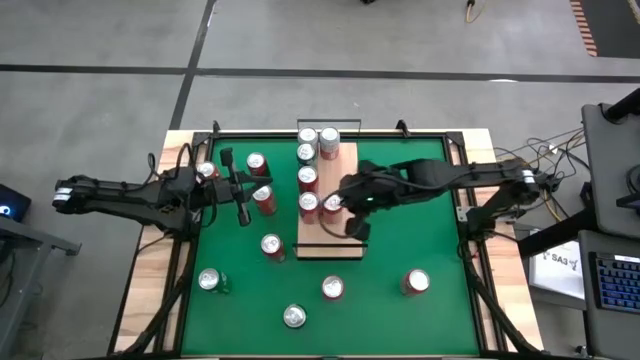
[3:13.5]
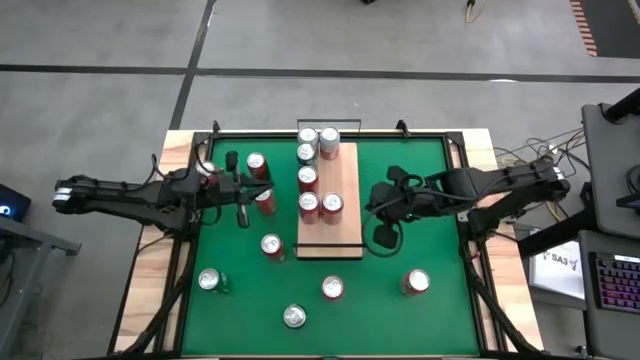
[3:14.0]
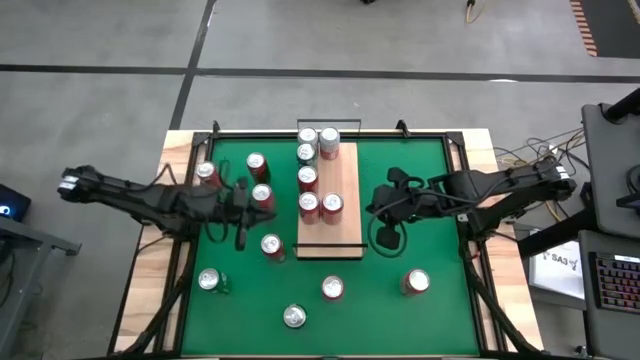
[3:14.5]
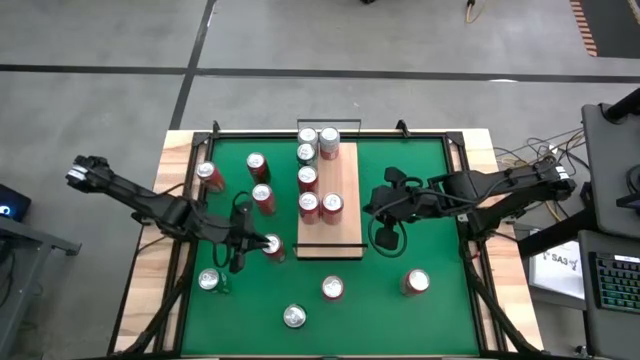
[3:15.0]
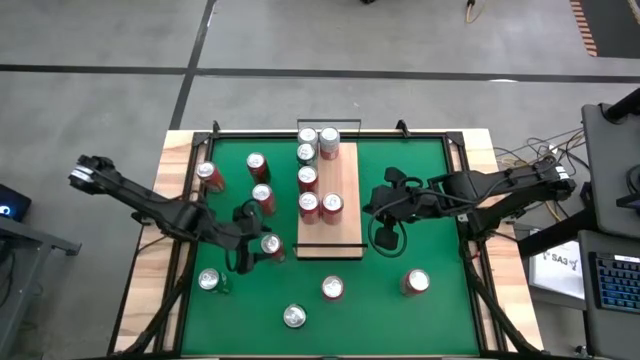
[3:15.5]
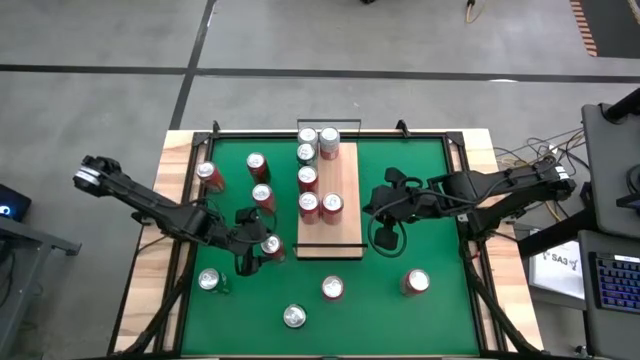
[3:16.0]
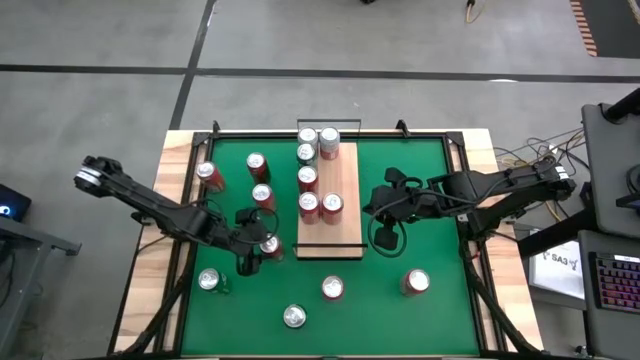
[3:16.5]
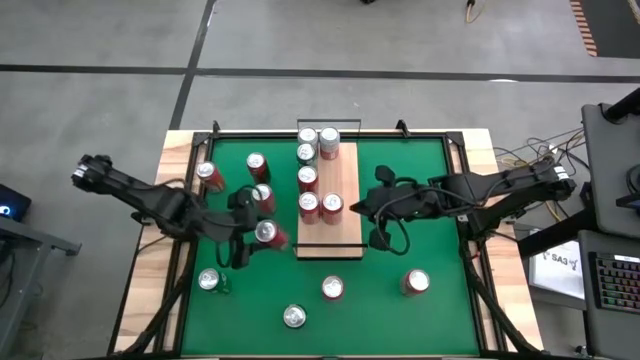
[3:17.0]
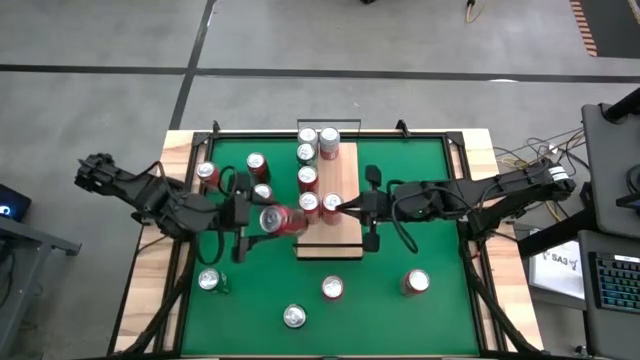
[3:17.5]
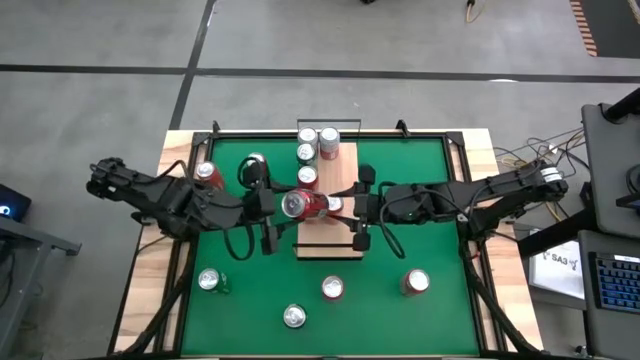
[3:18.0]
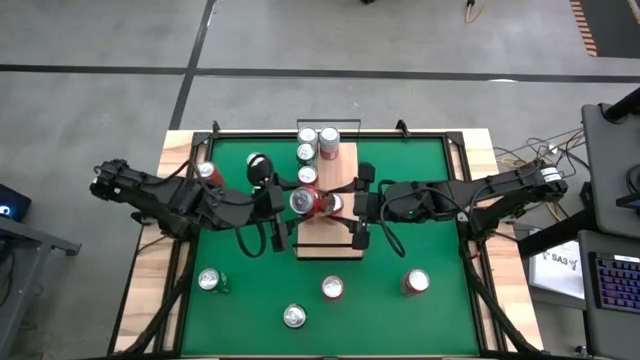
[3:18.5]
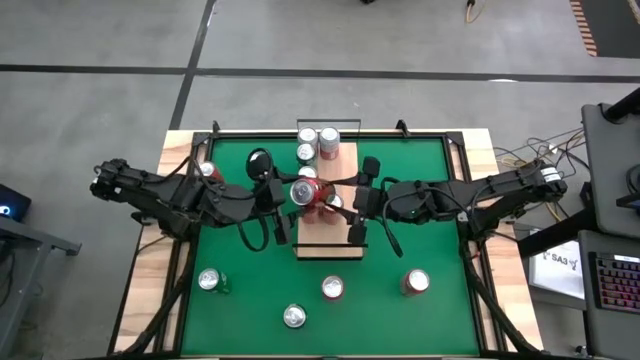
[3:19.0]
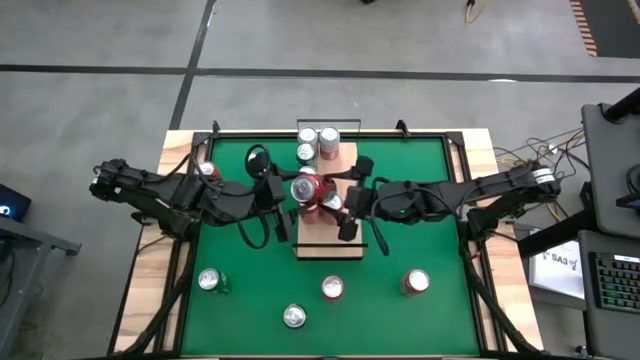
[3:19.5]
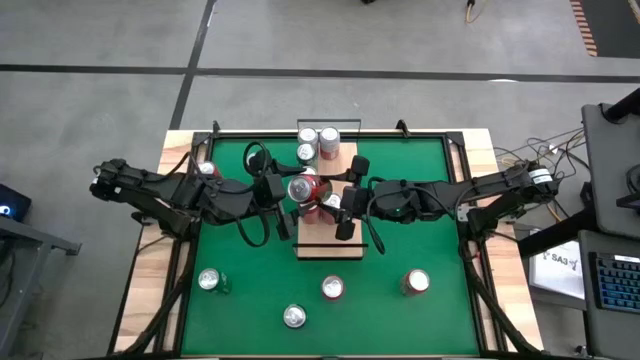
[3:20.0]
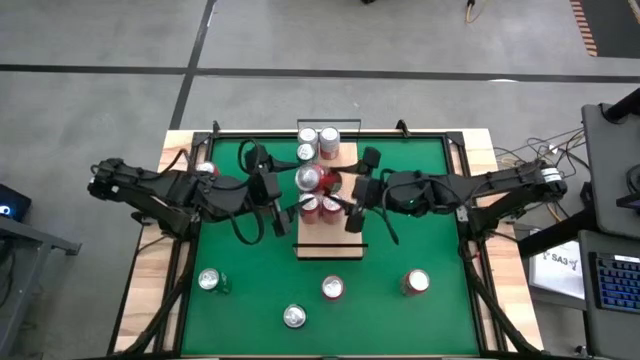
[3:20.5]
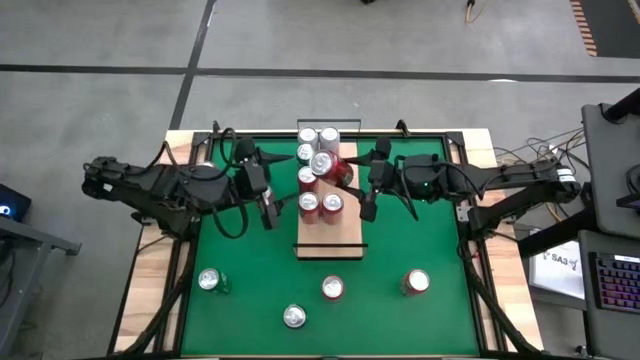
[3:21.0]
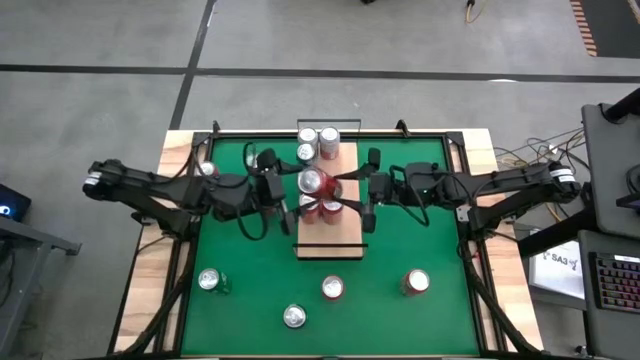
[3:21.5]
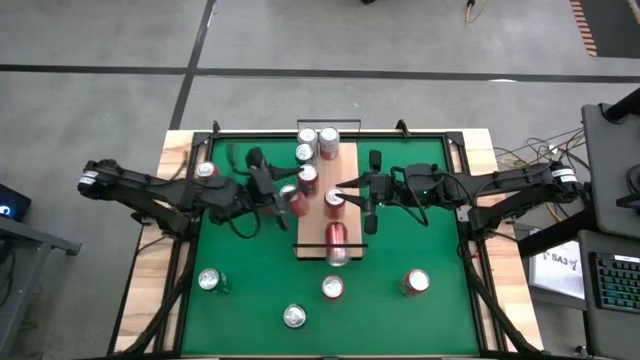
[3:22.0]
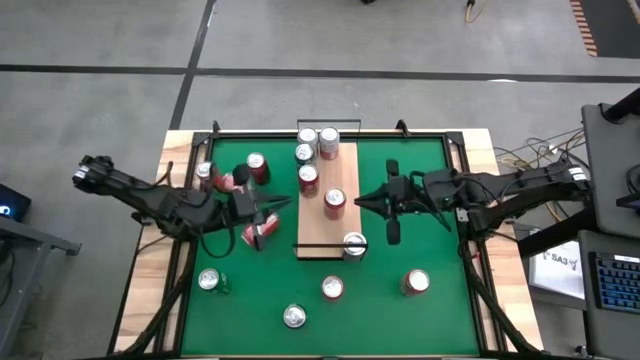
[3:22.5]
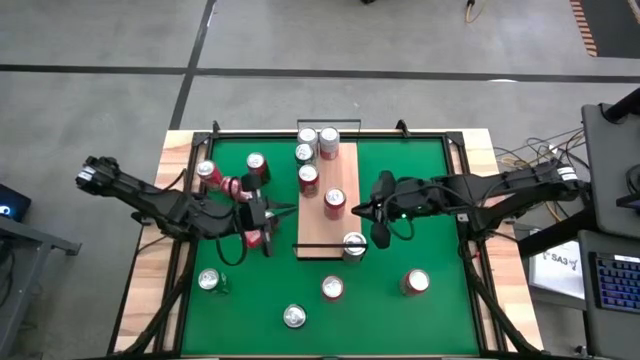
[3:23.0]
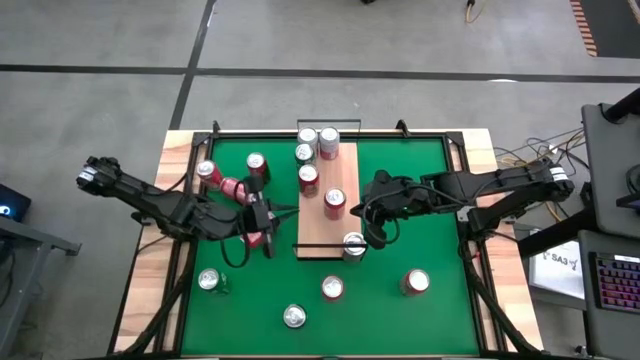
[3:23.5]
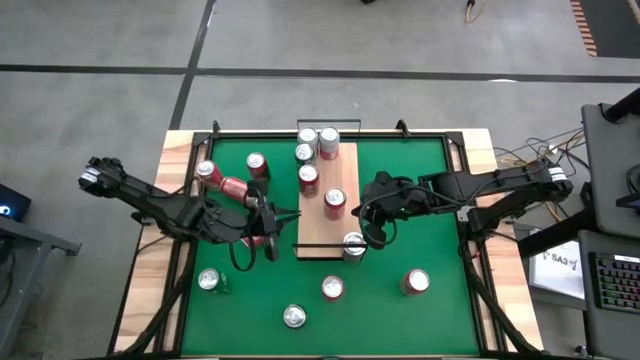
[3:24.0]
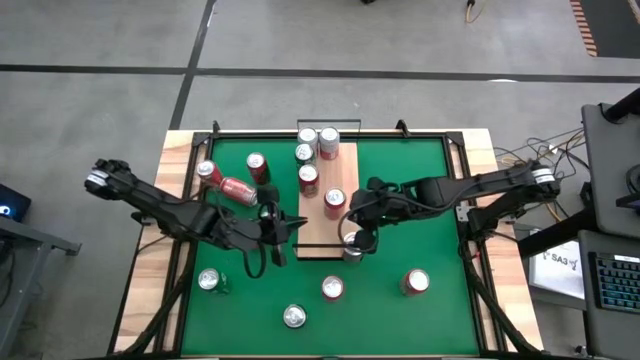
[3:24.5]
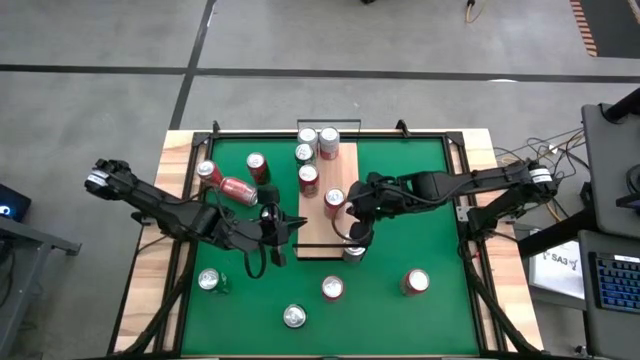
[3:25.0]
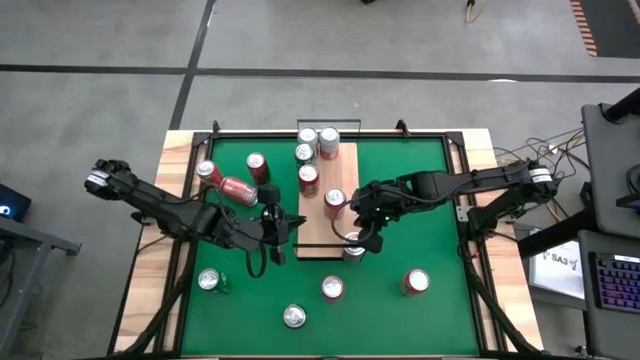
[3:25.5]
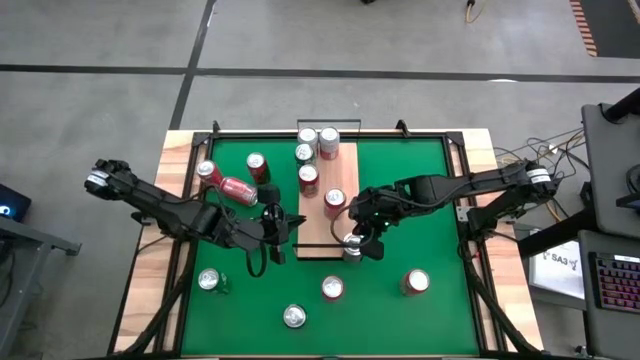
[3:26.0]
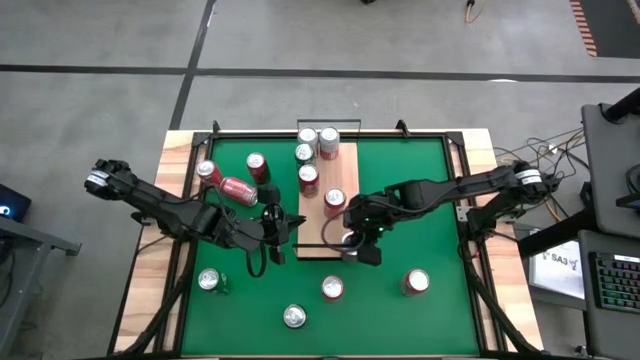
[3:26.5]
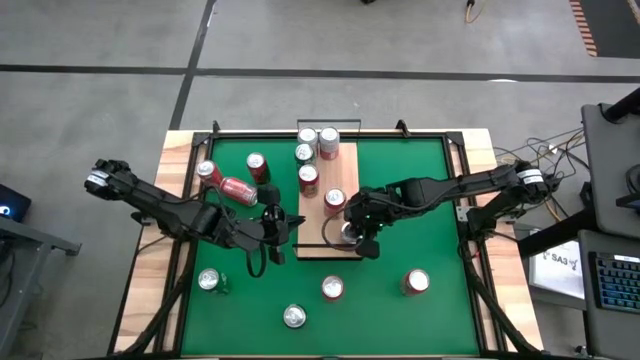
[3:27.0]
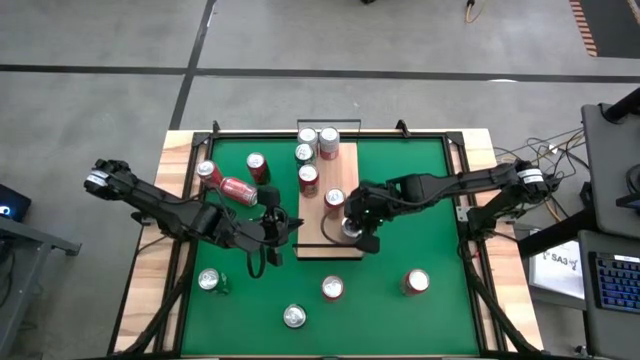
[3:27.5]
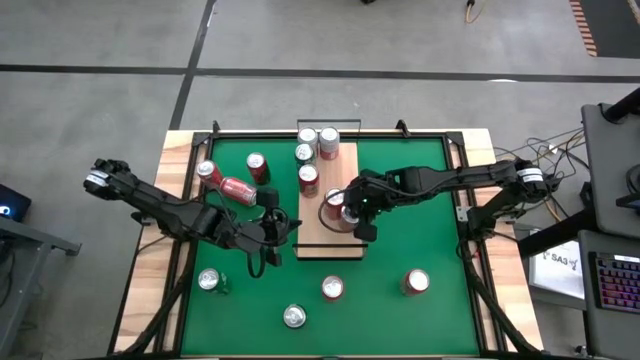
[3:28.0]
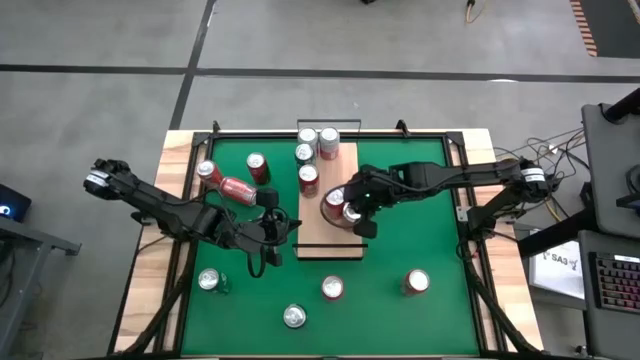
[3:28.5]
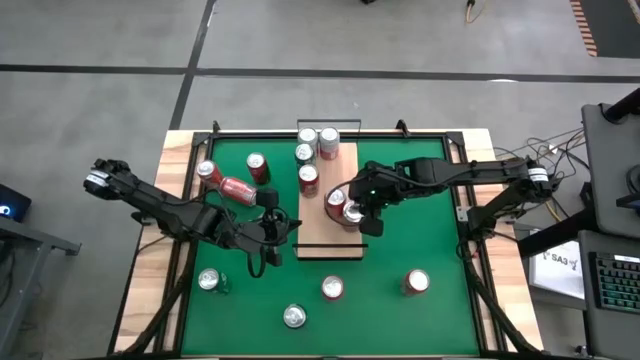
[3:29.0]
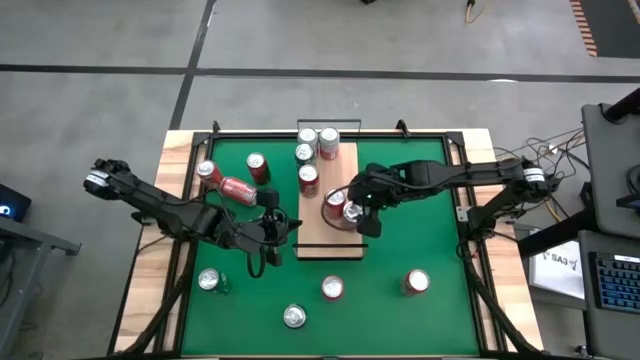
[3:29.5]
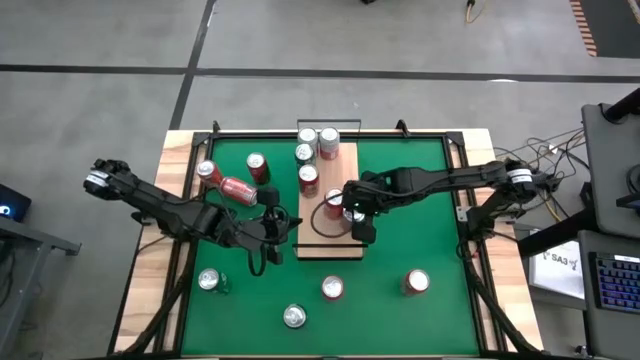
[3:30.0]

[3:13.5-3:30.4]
Task: Place canned beverage on shelf
Put the red soda can on the shelf and aligned with the other red soda can

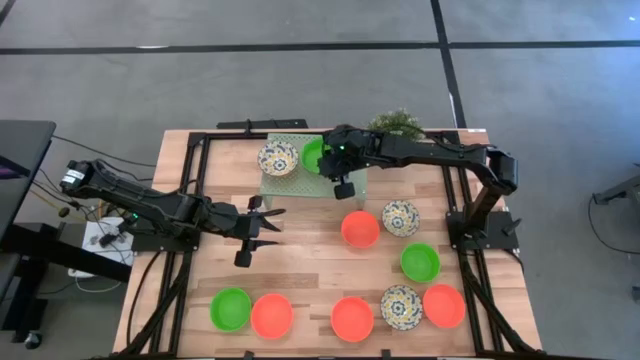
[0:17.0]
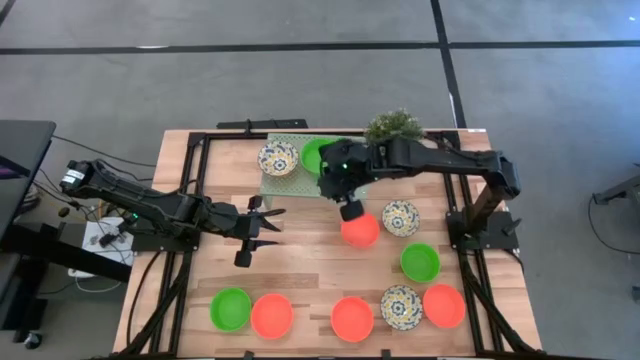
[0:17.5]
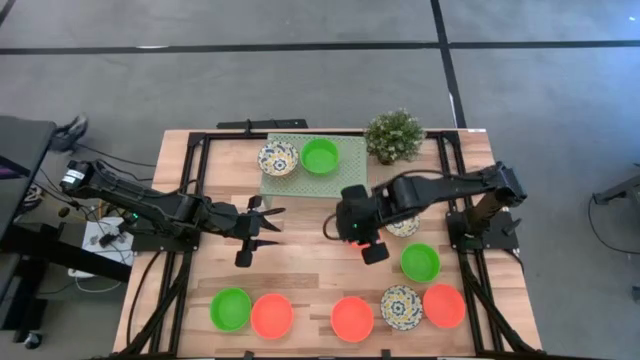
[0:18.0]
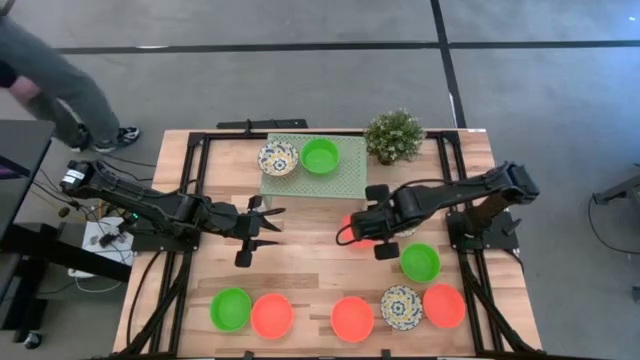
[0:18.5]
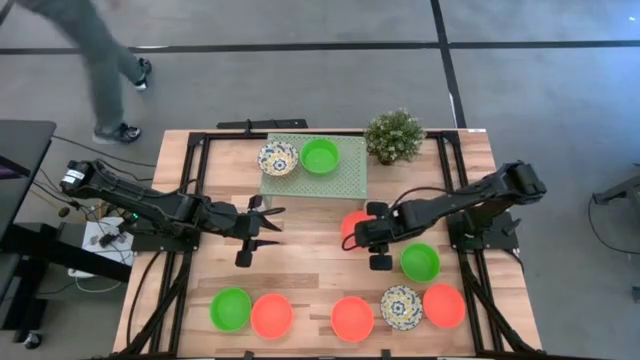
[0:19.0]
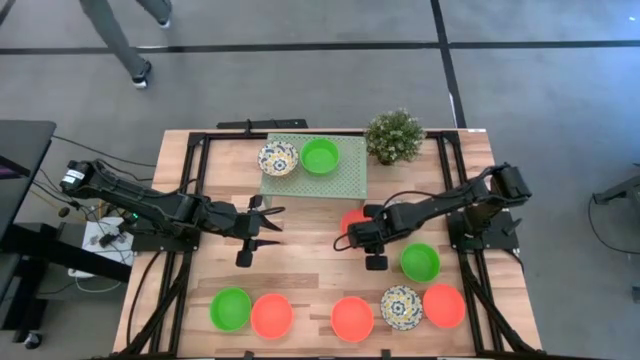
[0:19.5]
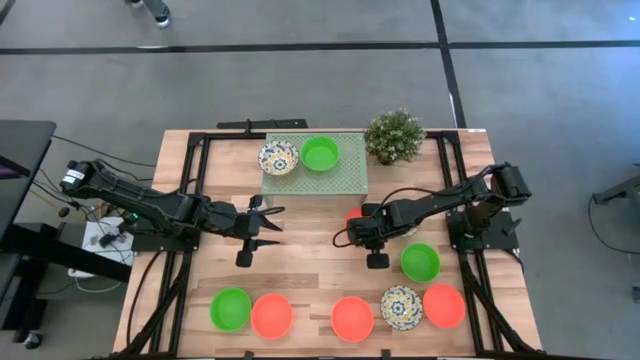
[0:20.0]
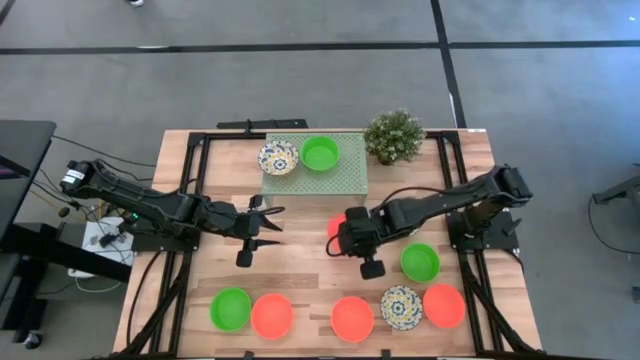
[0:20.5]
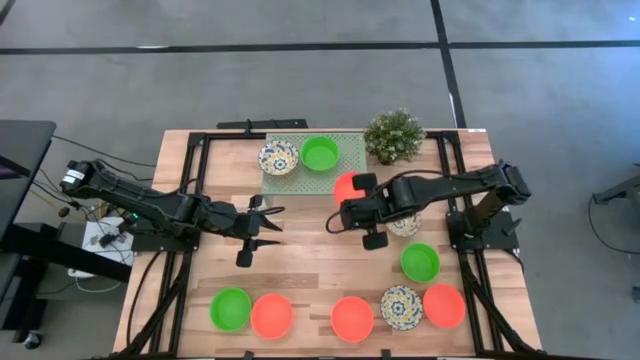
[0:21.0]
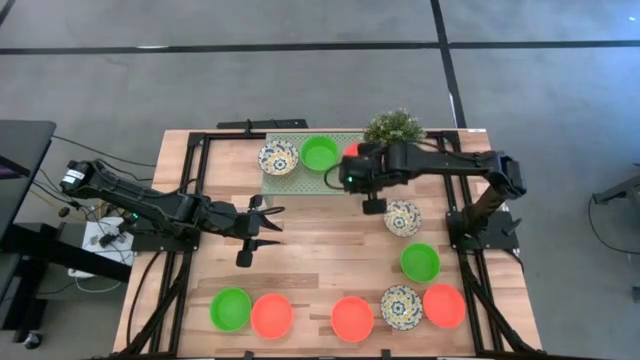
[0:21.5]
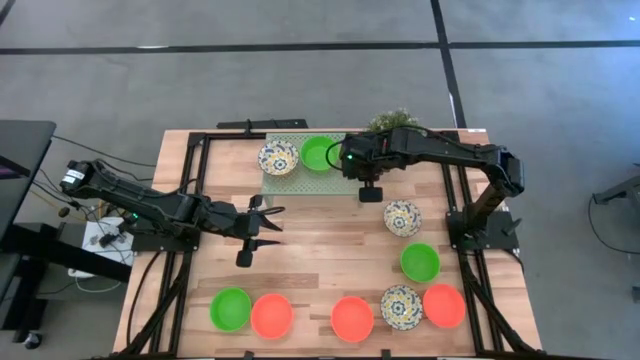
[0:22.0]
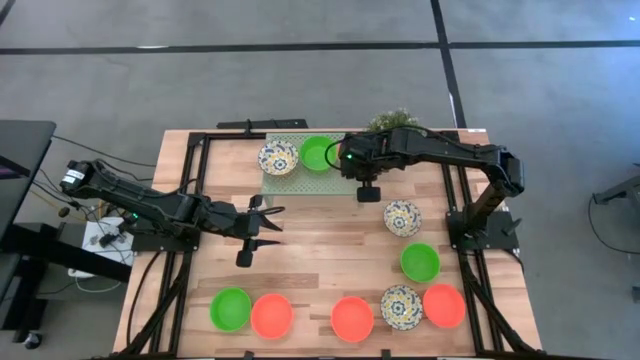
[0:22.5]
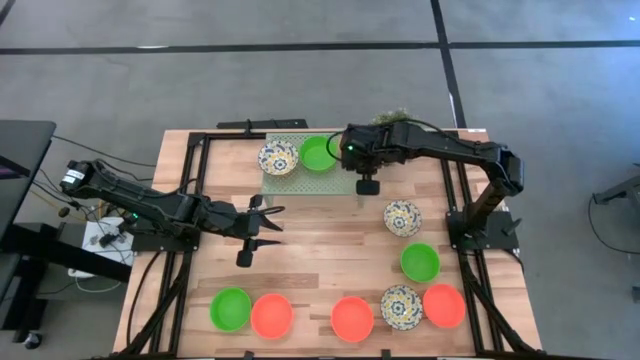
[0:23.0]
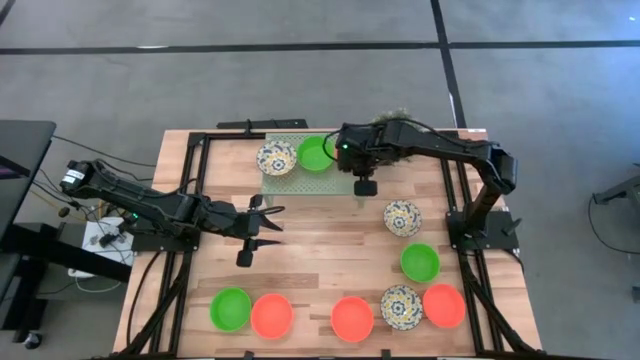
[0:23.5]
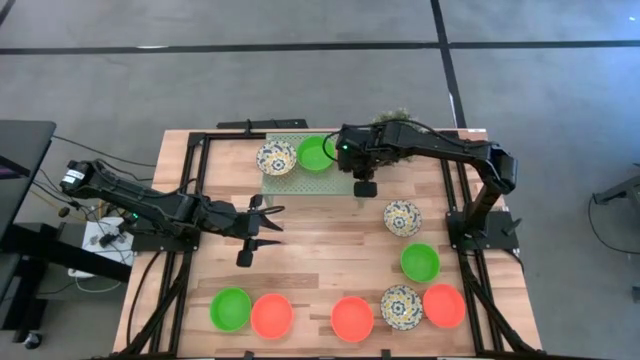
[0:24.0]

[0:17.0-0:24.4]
Task: Pick & Place Mini bowls
Put the orange bowl on the shelf
